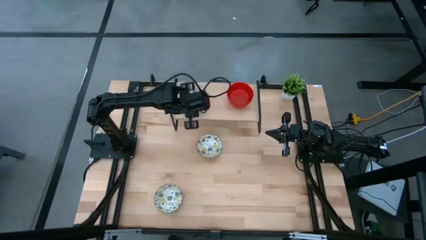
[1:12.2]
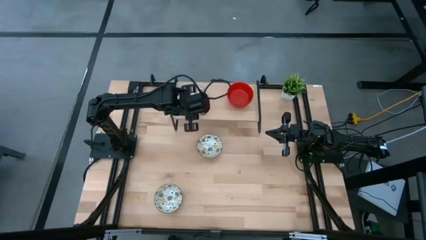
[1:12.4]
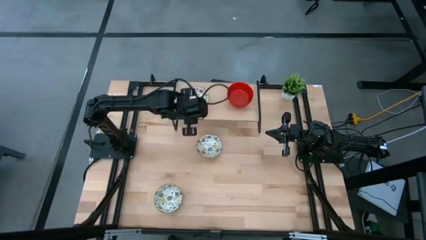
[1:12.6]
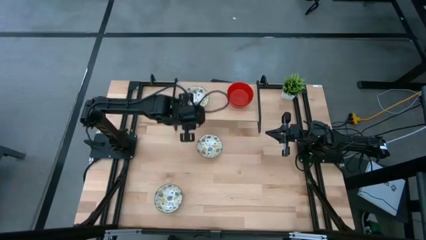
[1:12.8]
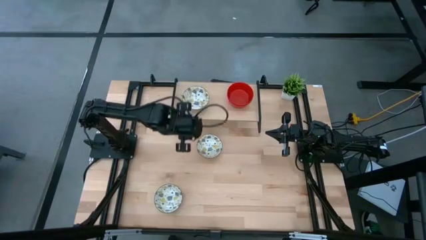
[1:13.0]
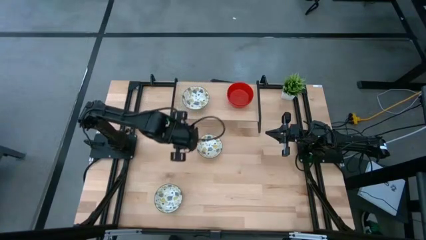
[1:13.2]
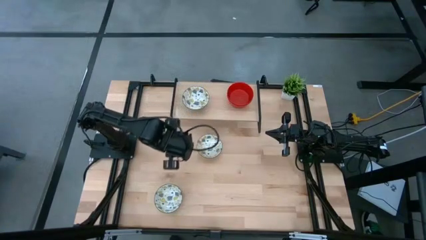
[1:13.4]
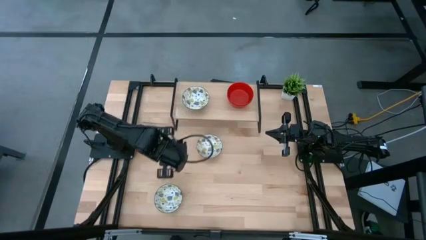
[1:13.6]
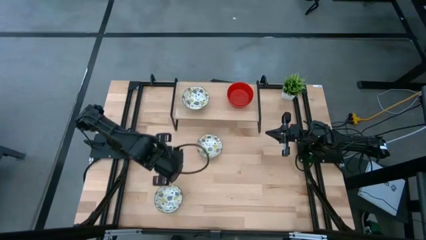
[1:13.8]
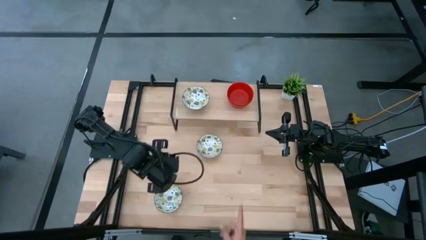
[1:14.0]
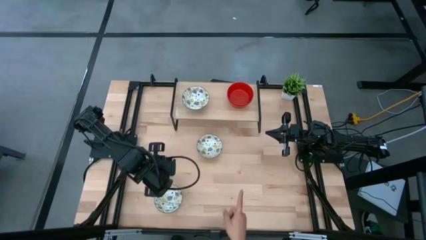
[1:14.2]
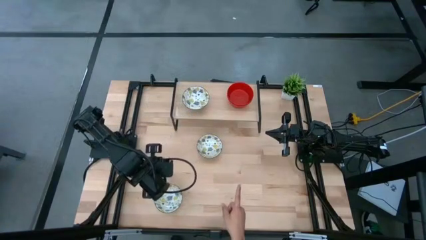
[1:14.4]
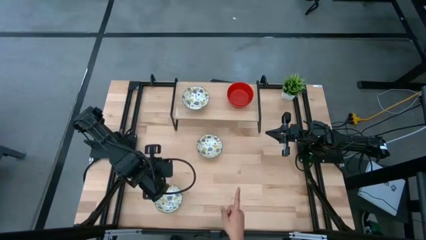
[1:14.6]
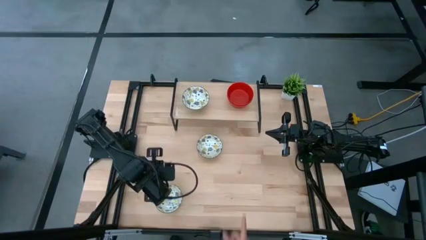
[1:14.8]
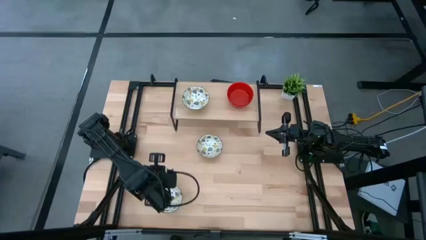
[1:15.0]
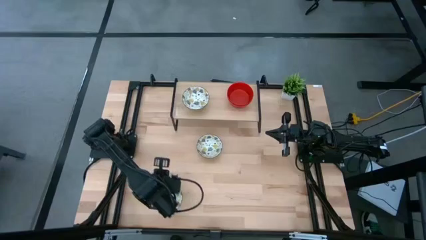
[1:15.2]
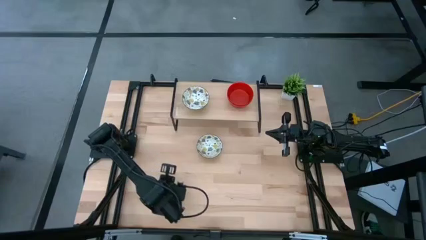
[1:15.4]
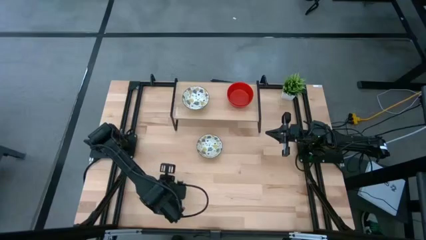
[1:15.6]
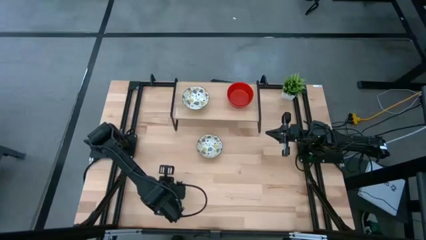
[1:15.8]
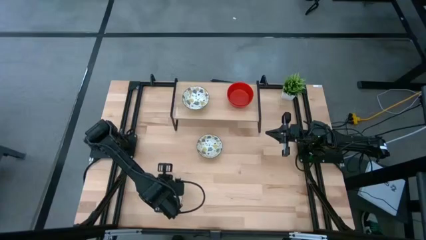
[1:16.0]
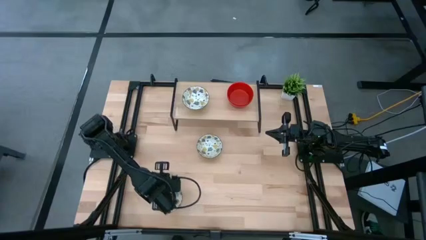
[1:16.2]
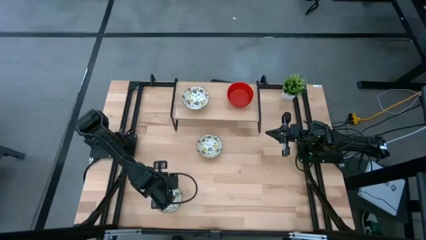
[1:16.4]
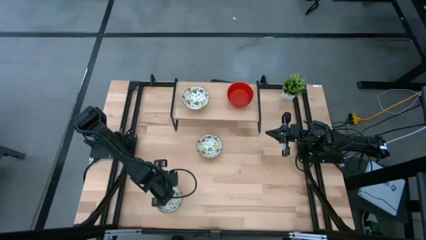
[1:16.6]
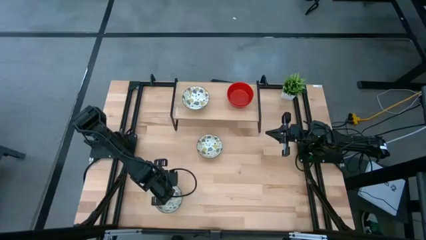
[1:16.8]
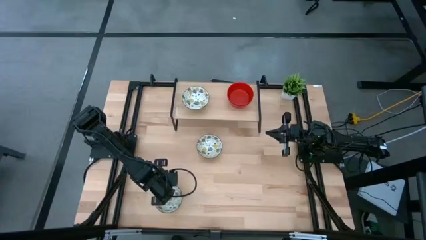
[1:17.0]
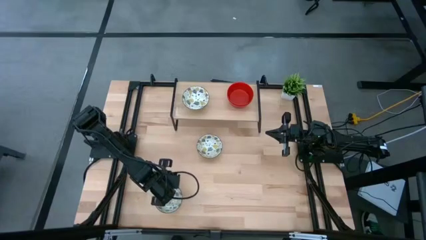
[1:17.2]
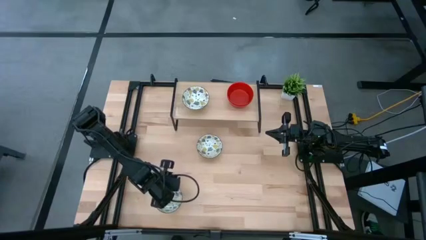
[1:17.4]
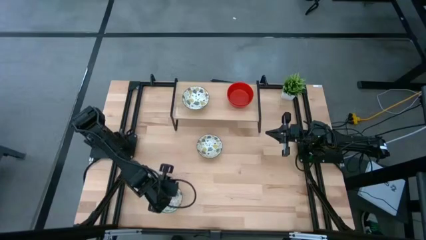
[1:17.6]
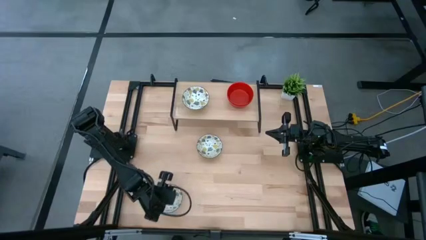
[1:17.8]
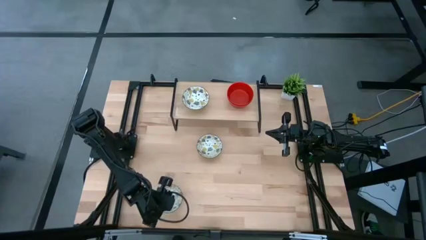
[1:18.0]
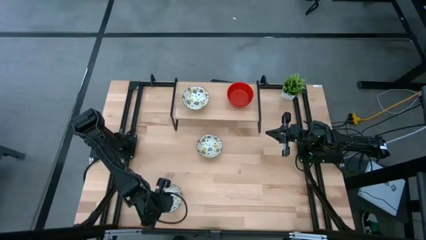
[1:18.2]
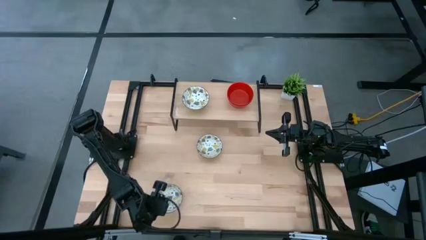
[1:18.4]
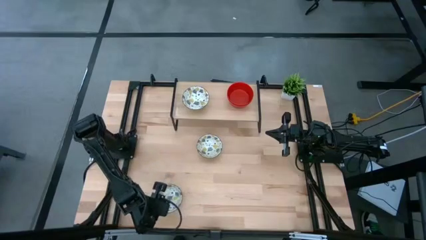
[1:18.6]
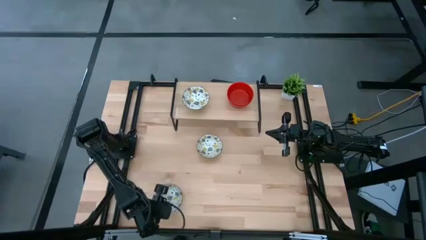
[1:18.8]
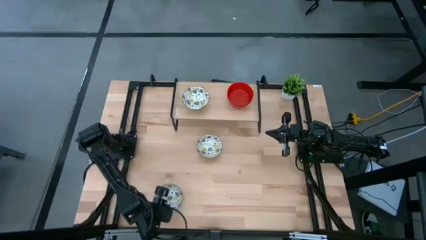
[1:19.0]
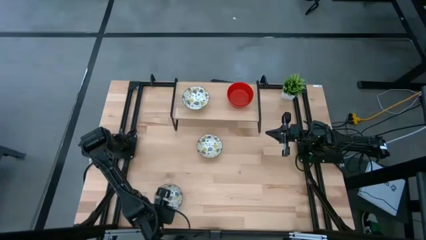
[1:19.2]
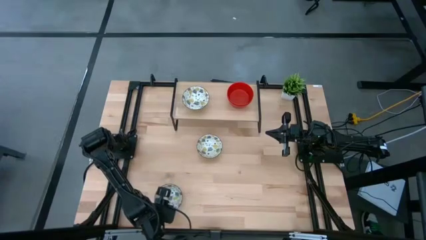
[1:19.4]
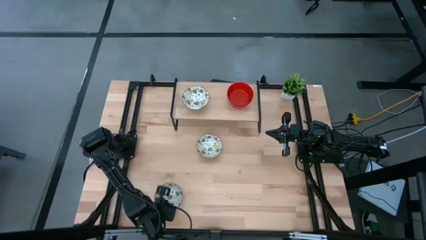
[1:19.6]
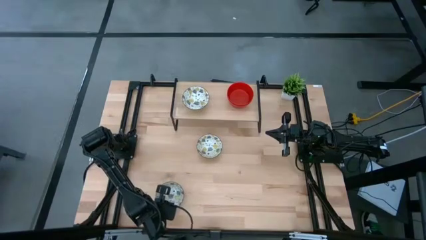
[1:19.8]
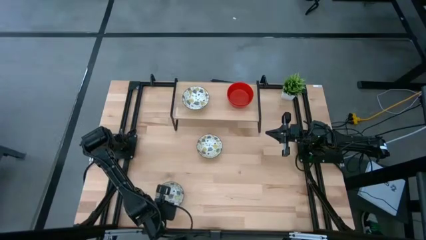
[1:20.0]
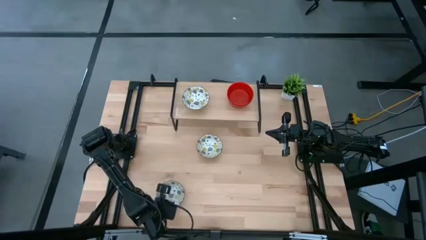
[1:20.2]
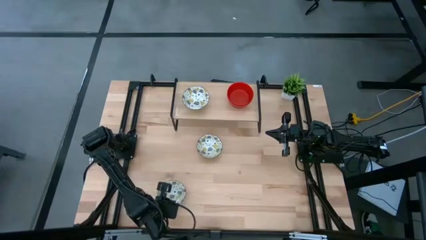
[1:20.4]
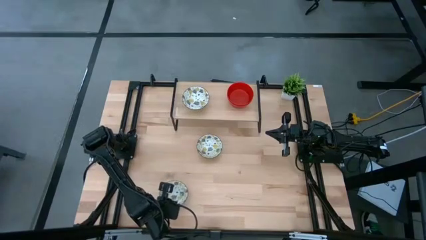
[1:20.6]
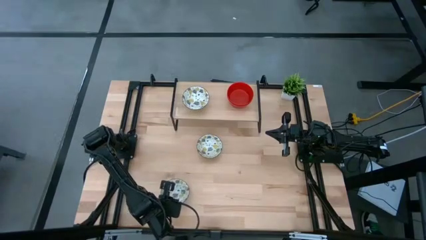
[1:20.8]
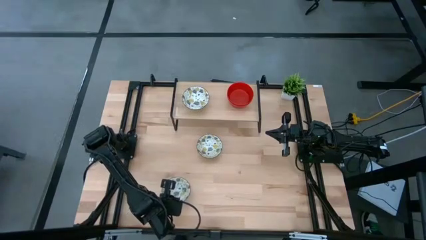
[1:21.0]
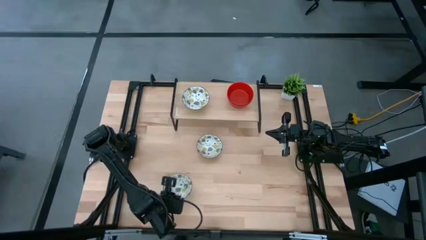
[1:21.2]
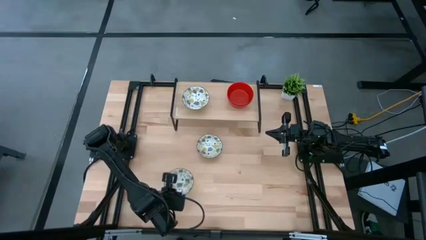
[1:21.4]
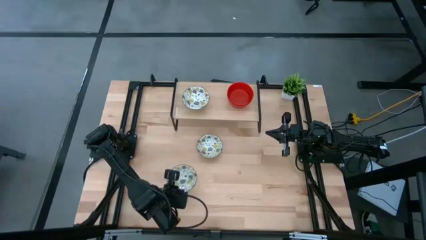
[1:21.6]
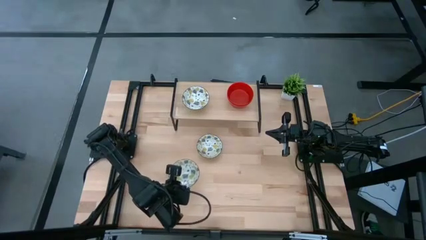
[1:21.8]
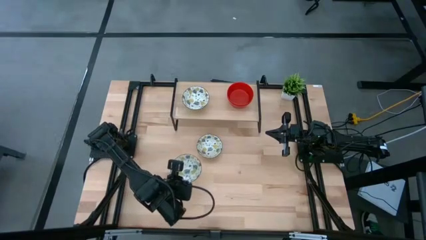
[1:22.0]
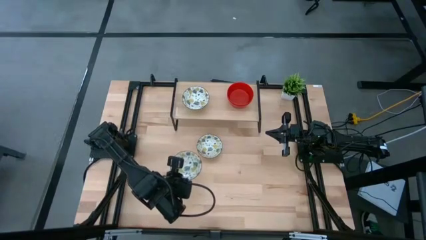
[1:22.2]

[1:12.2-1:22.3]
Task: Pick & Place Mini bowls
Stack the bottom white patterned bowl on top of the white patterned bowl on the shelf

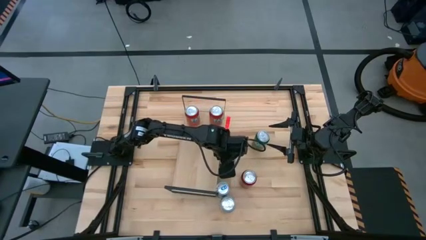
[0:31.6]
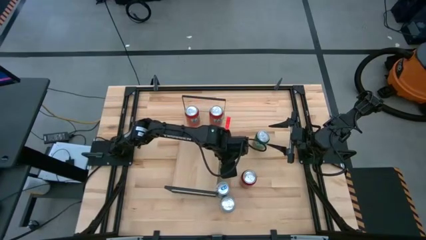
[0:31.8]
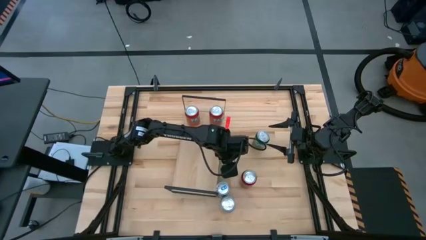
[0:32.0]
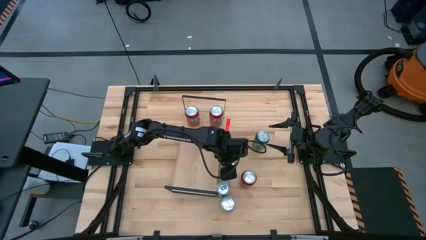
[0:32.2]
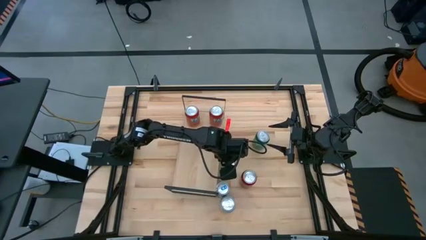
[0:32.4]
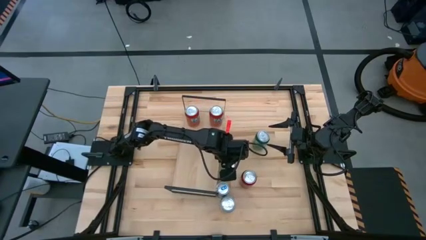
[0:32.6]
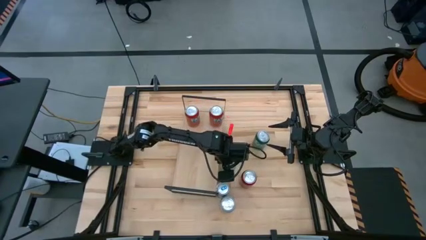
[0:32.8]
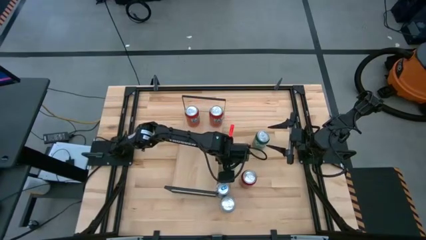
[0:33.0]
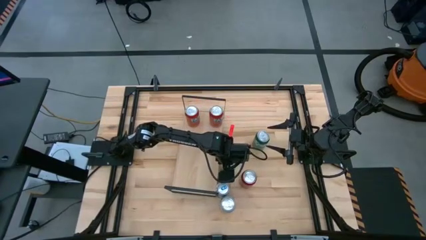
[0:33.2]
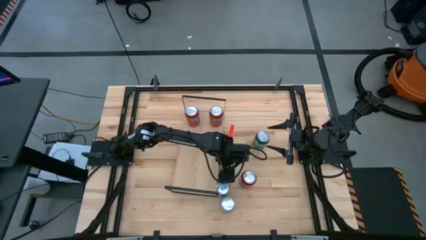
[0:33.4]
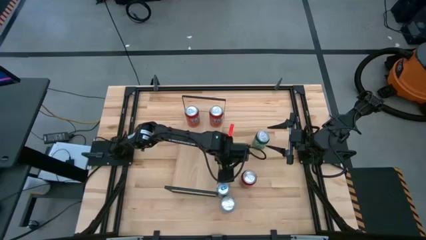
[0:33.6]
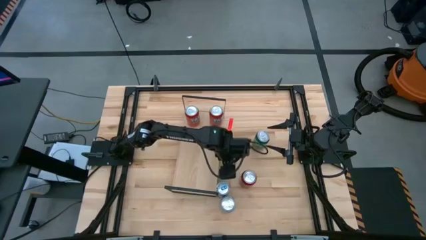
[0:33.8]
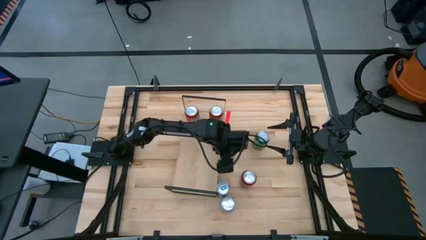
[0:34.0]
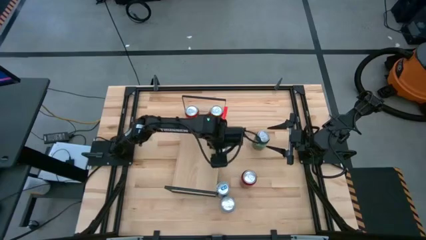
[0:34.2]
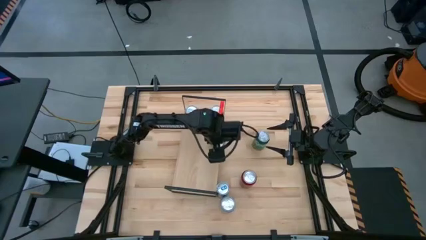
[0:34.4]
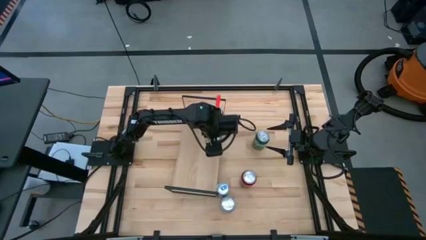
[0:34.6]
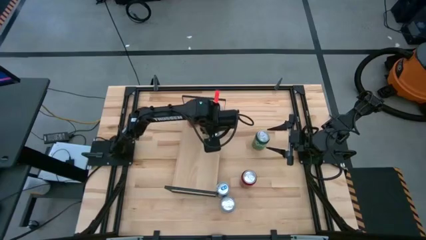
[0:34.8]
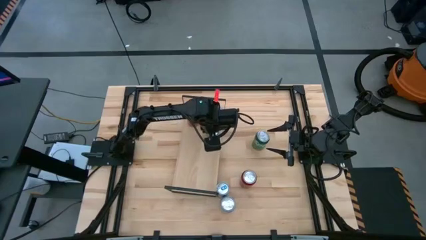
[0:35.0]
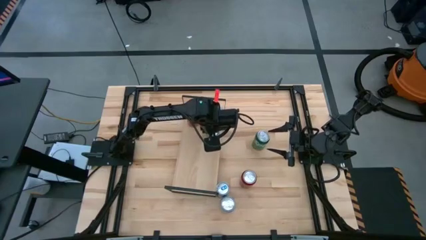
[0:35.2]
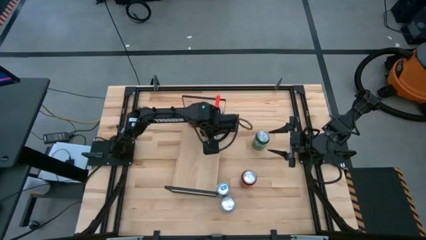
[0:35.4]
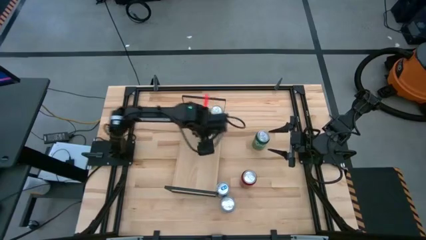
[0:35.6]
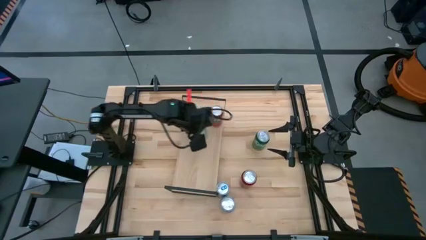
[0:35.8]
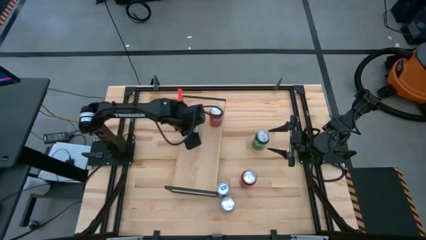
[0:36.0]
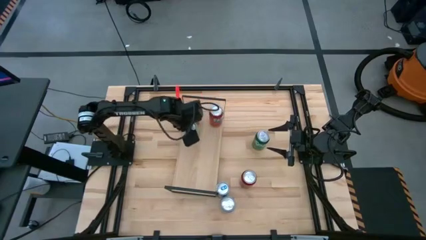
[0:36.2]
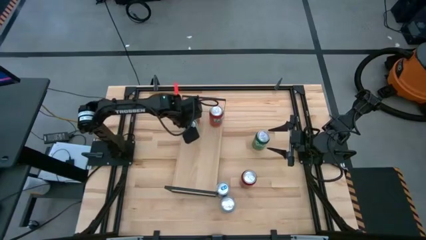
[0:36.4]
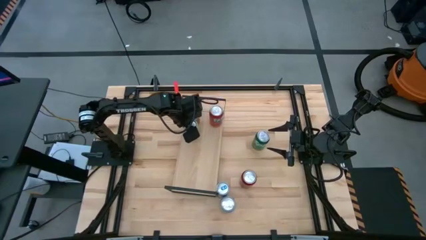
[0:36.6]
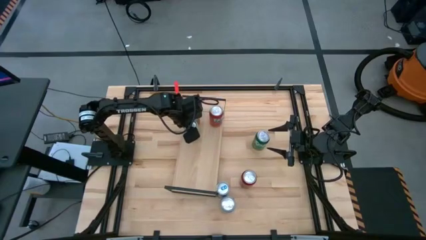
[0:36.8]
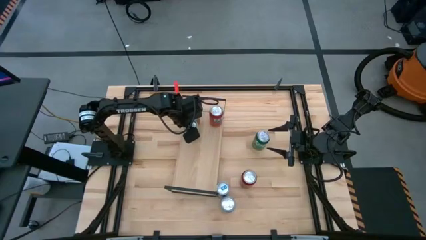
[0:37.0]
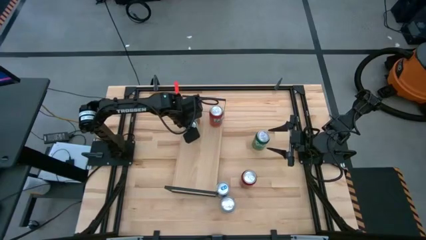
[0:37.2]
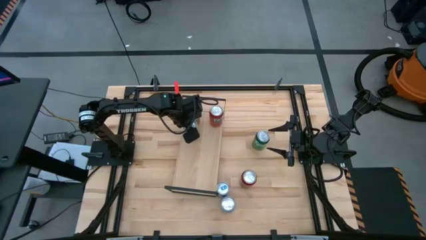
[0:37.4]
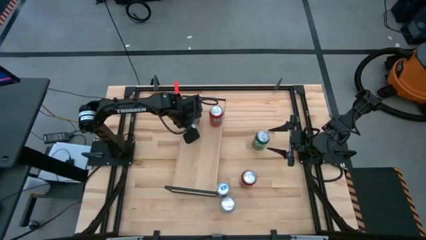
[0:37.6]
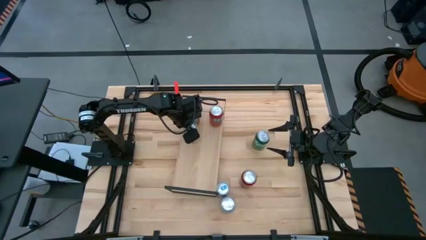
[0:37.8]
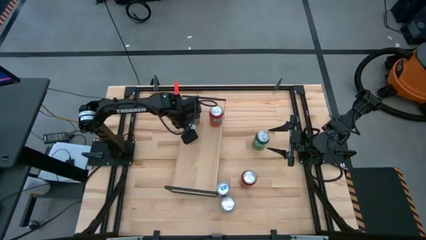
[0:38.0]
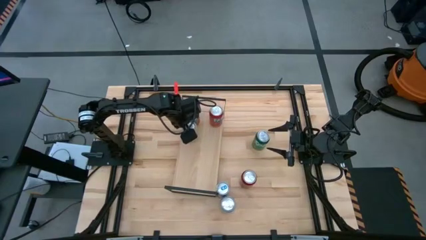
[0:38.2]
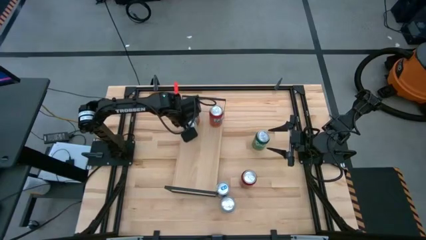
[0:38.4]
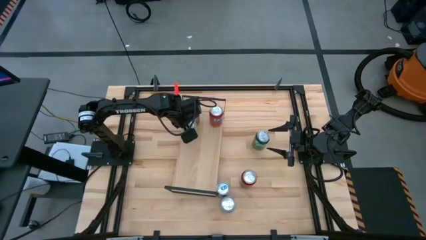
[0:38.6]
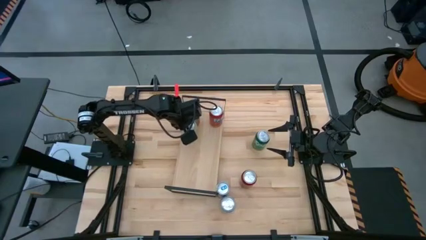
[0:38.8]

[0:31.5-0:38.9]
Task: Place canned beverage on shelf
Put the light green soda can on the shelf
